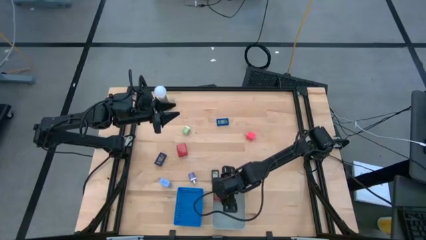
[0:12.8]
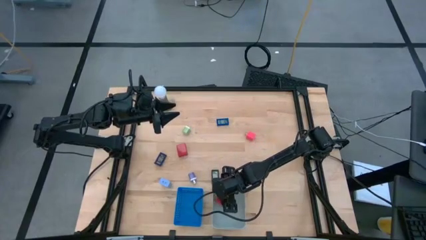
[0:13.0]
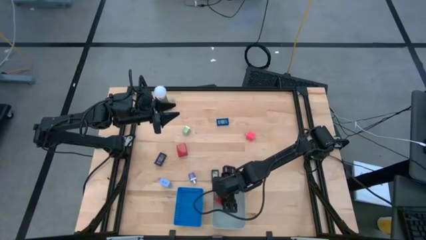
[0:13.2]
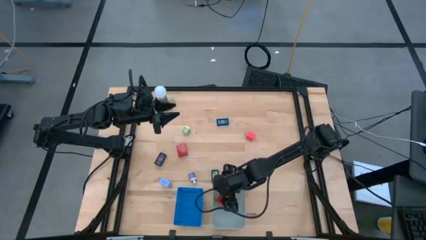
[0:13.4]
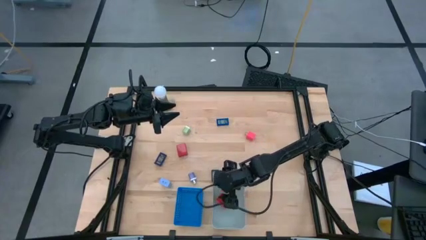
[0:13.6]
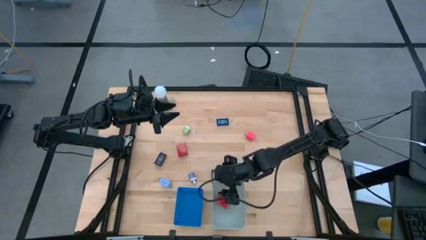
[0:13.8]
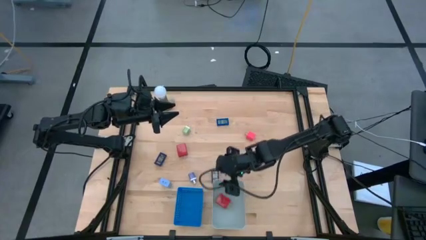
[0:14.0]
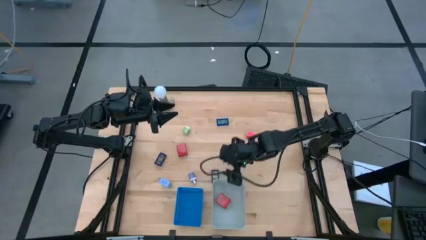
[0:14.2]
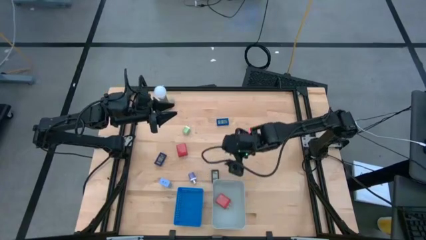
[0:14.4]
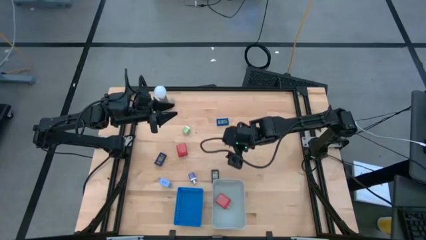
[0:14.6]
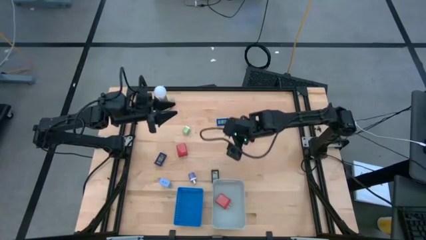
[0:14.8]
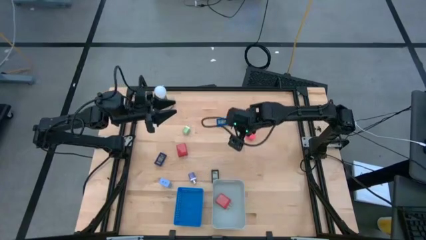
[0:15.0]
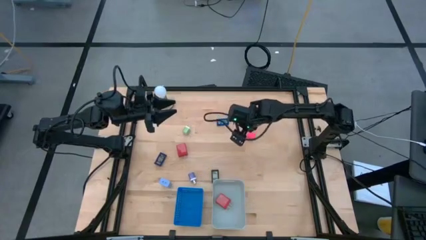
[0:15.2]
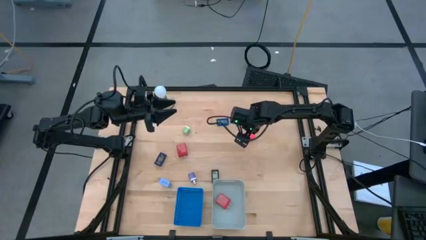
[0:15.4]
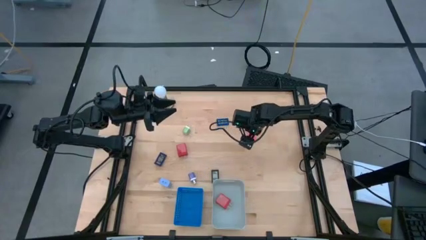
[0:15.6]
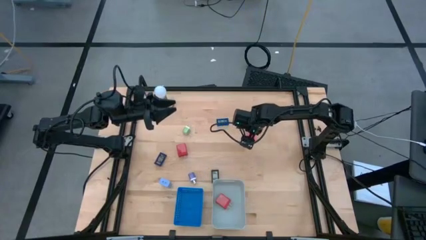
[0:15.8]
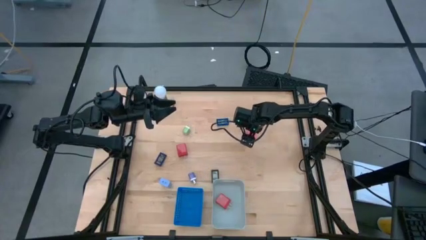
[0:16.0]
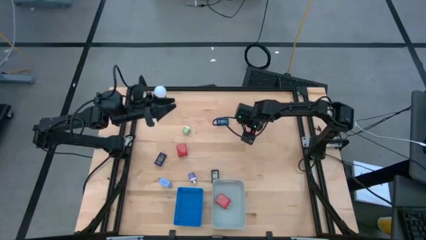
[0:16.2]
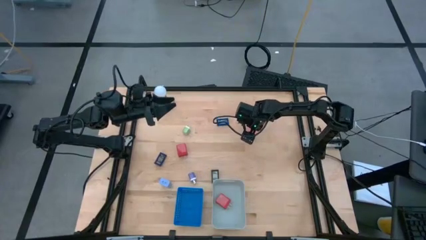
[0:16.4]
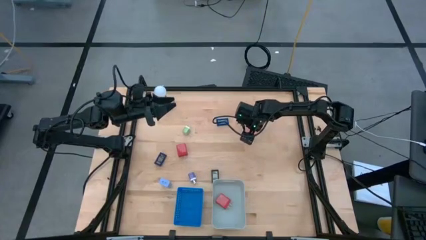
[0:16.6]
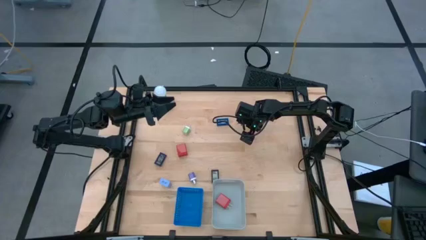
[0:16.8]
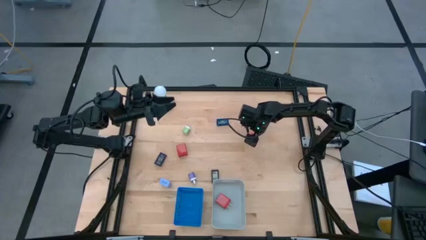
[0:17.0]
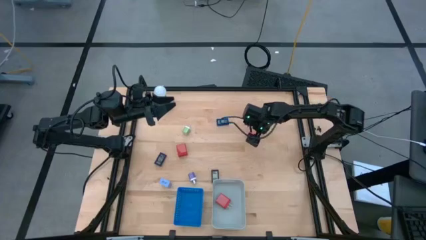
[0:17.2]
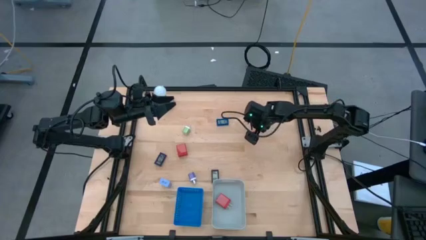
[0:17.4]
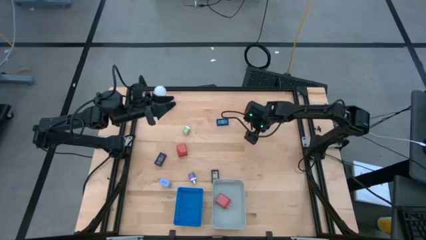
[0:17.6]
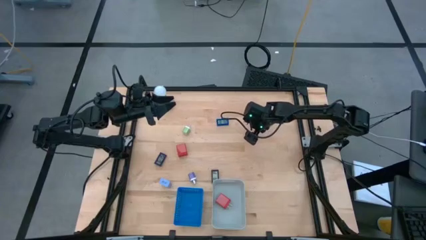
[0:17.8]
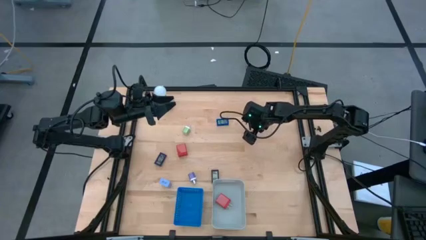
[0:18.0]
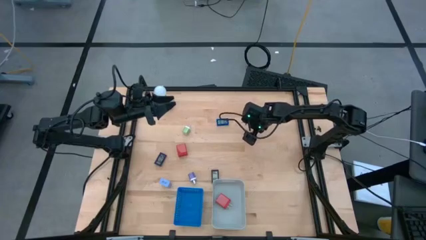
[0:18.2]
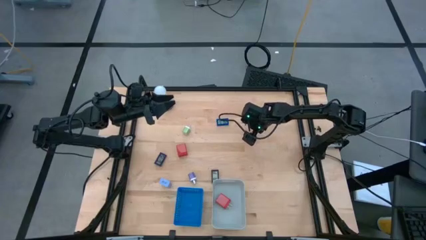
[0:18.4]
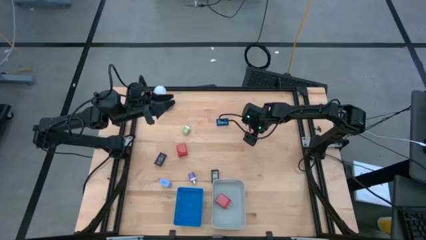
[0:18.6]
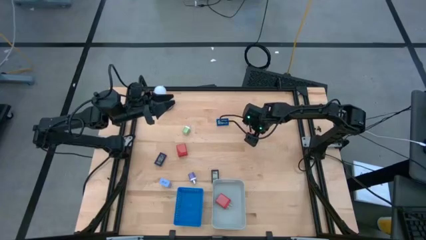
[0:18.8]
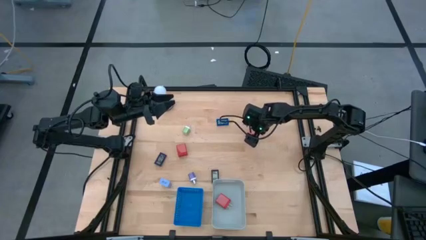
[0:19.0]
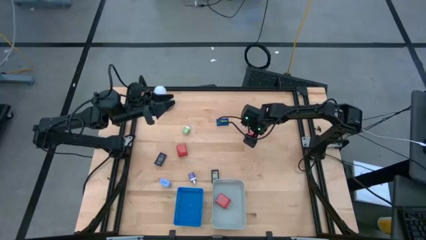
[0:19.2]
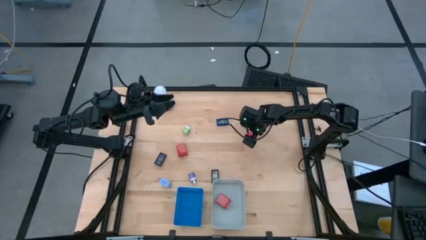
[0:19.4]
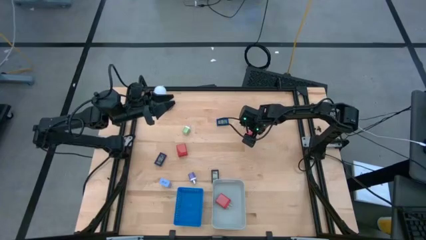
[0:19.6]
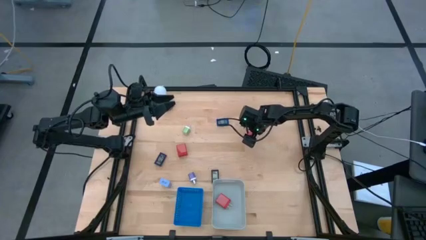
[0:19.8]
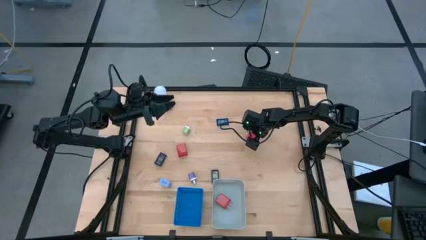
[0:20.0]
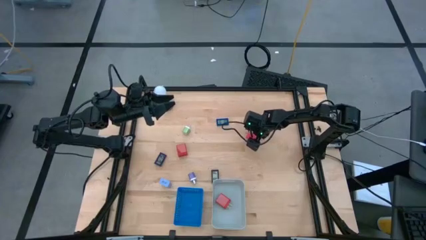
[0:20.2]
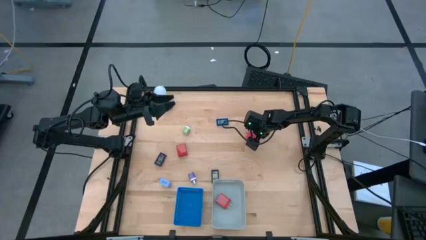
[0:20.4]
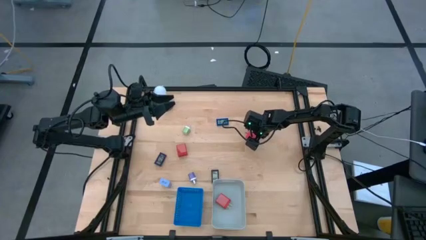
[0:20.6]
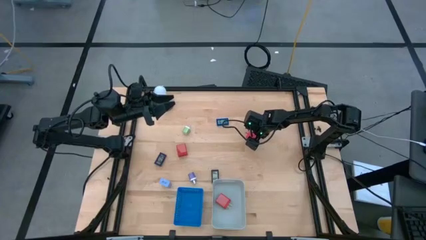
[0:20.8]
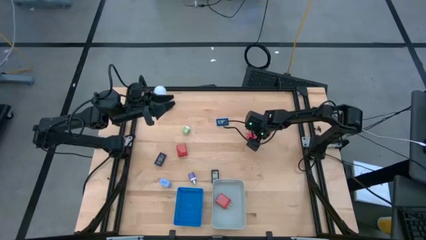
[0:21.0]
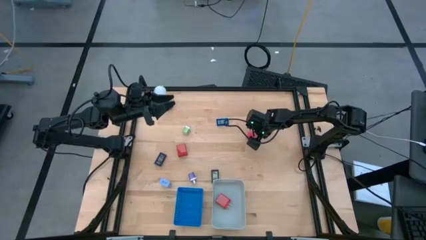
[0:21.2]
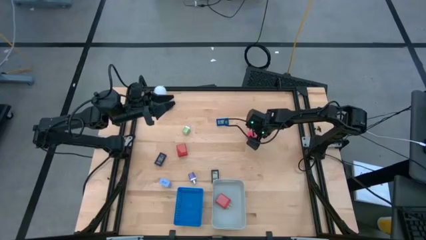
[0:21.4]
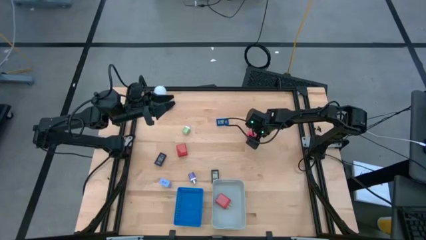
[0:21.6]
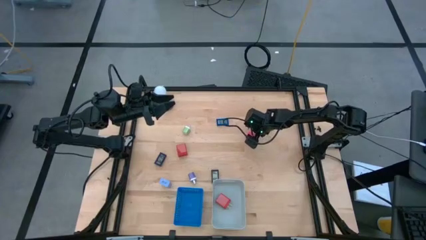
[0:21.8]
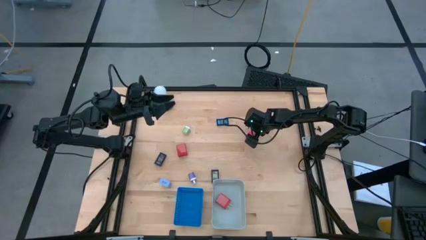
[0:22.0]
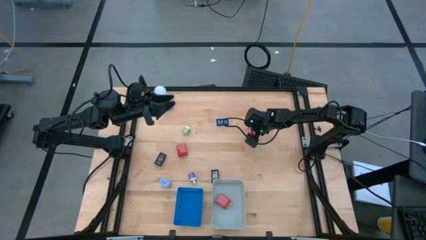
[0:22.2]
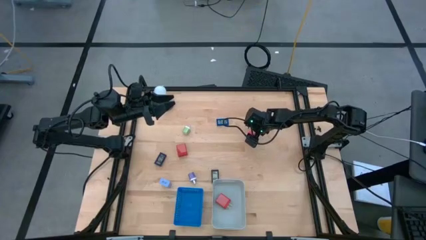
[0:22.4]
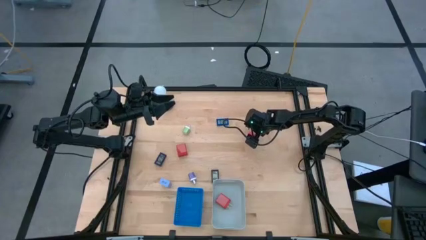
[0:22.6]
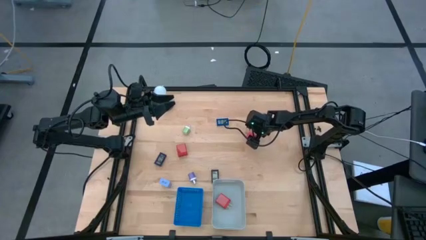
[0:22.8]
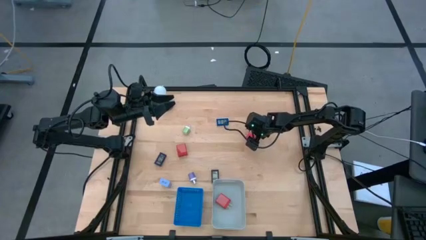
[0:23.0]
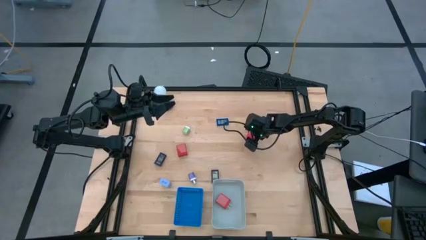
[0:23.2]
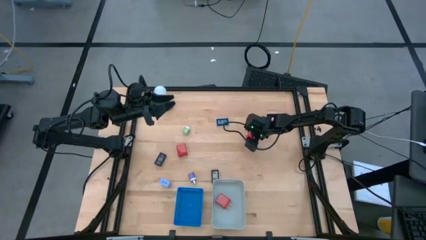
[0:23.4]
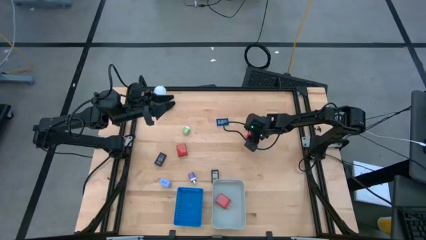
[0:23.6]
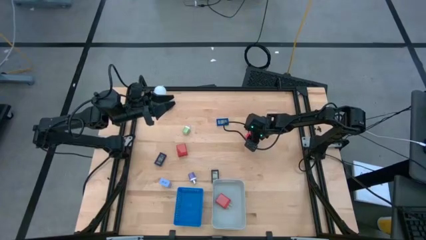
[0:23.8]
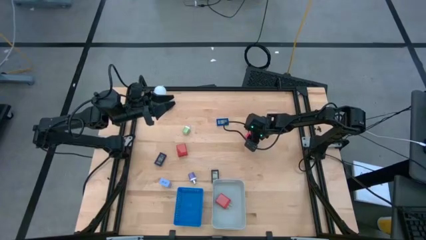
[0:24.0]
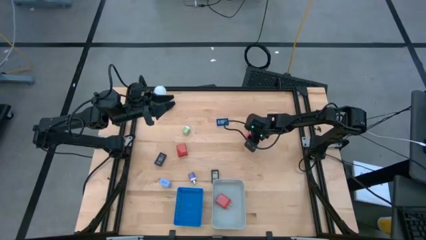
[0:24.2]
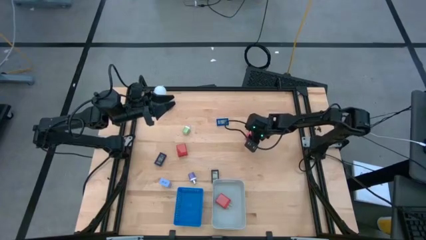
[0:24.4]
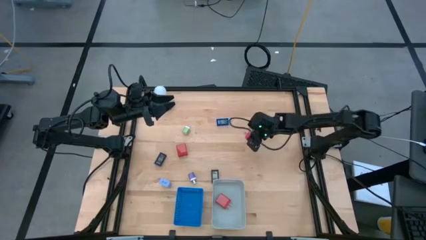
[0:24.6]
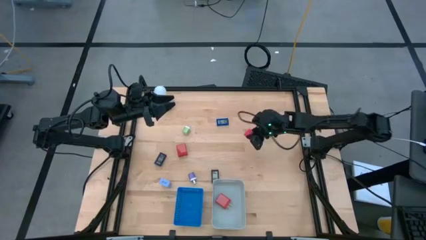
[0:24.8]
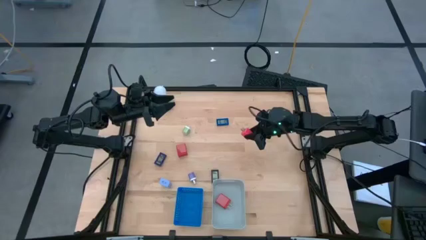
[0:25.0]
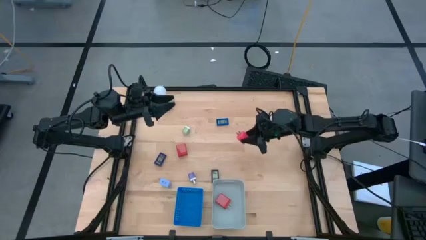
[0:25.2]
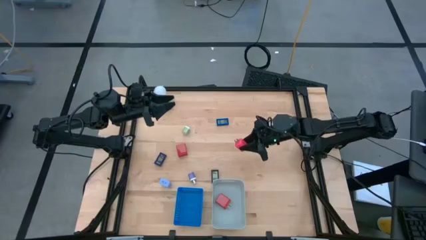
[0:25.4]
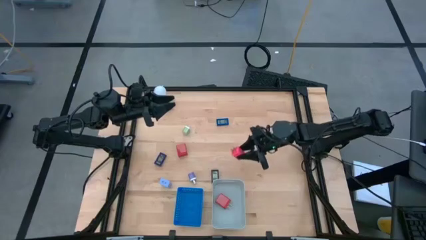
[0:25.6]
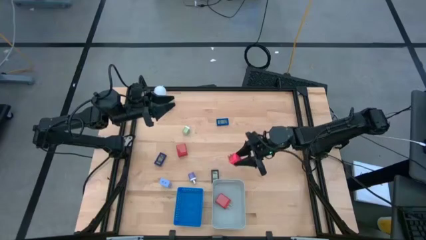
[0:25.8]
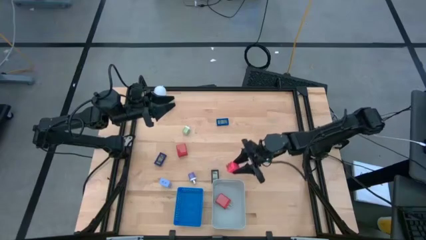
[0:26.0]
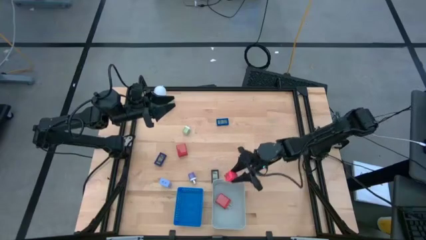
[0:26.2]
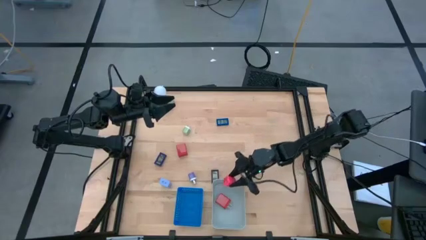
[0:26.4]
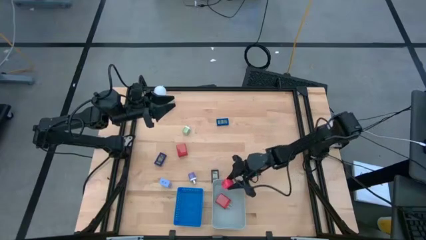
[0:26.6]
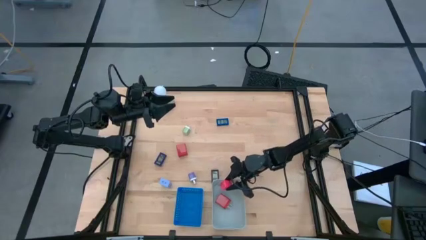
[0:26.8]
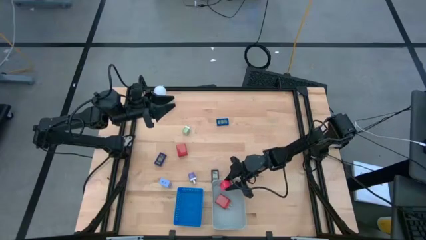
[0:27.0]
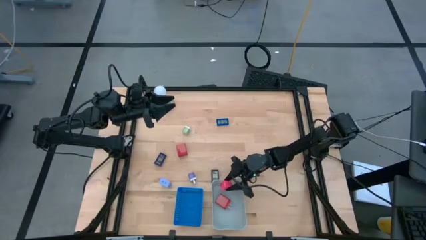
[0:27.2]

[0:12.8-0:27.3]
Task: Pick & Place Office items
Put the pink charger adapter into the gray bin
